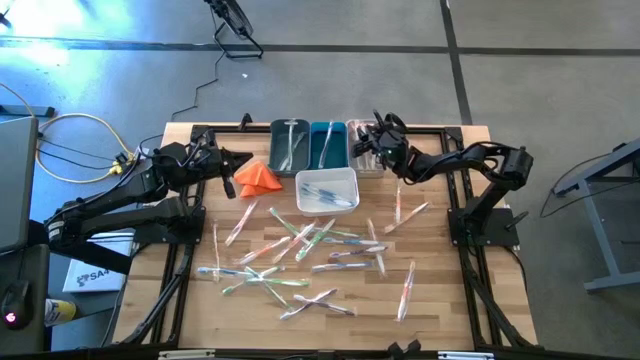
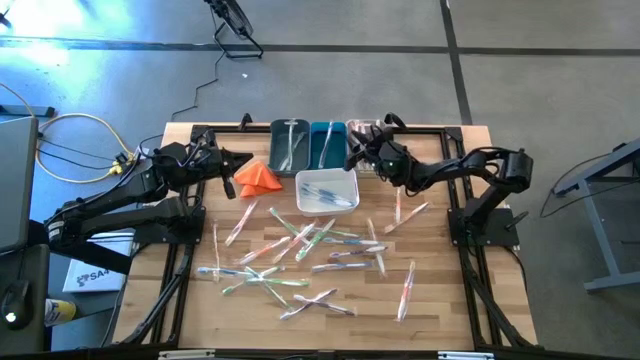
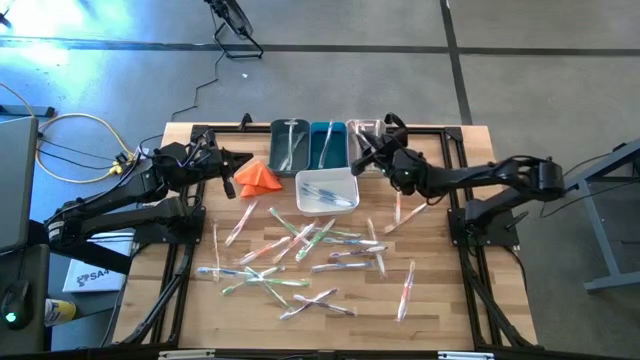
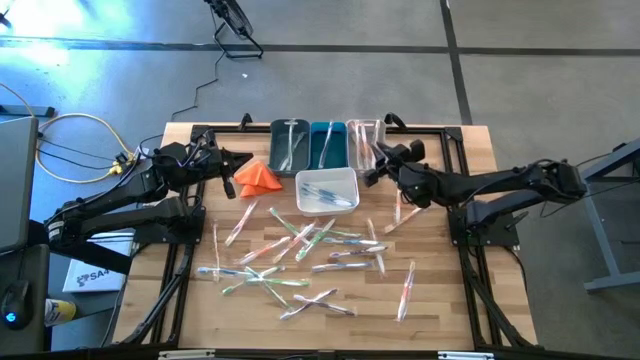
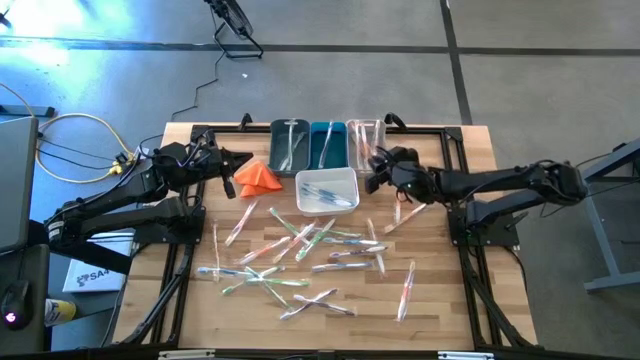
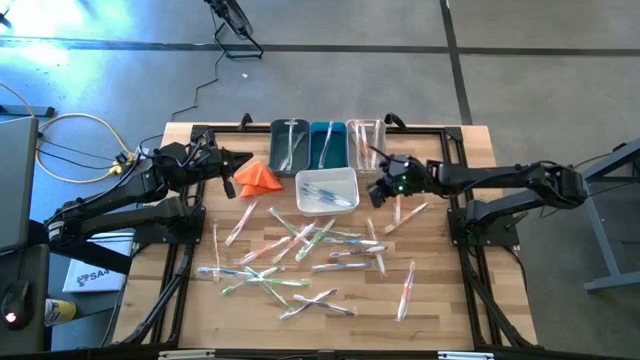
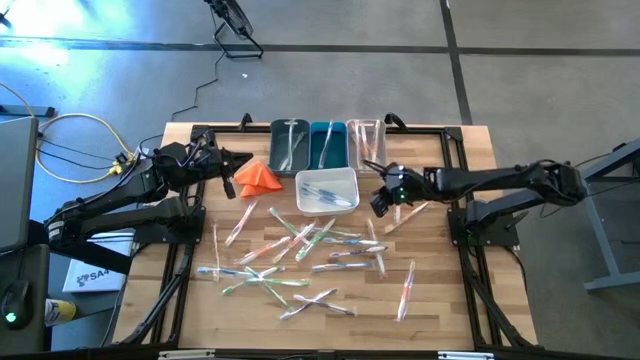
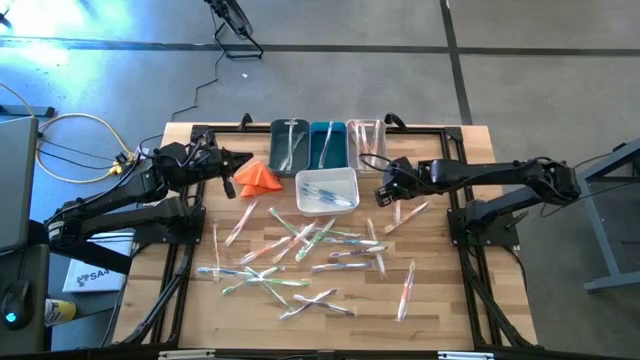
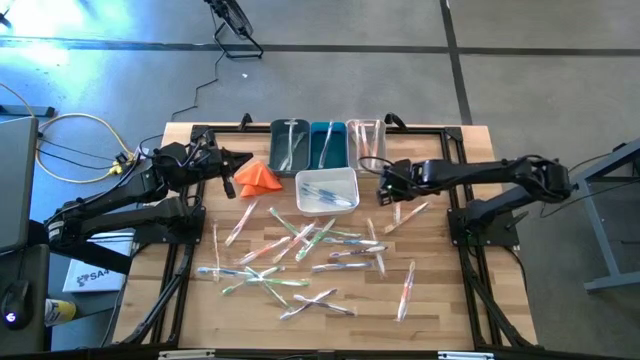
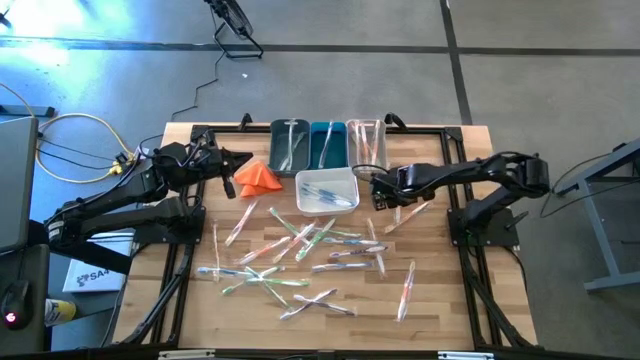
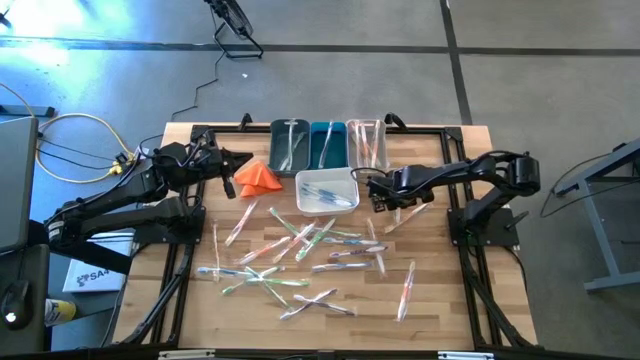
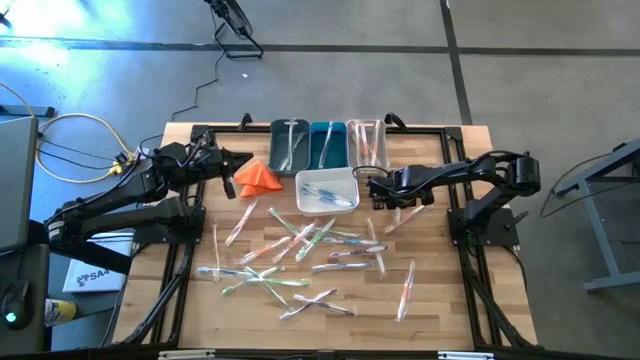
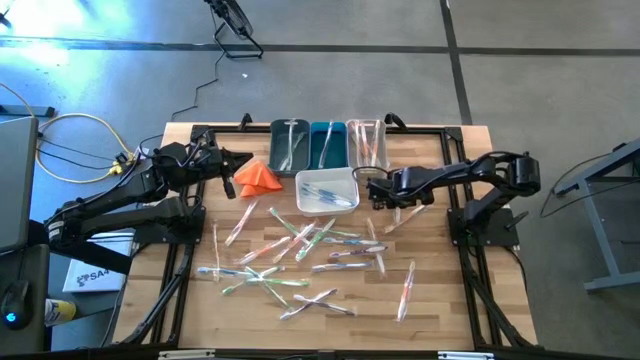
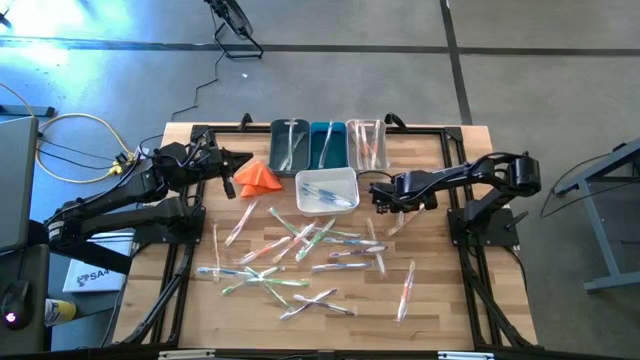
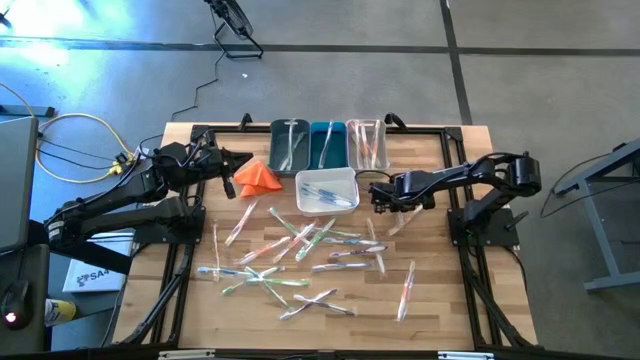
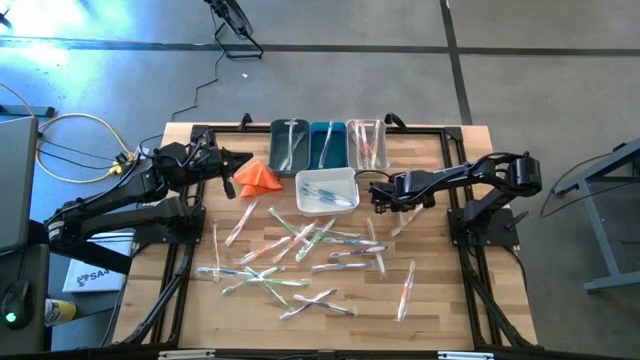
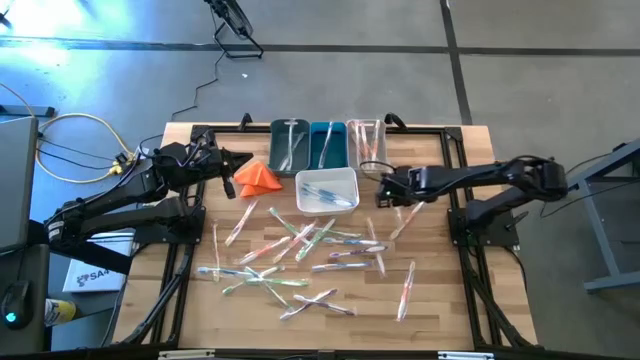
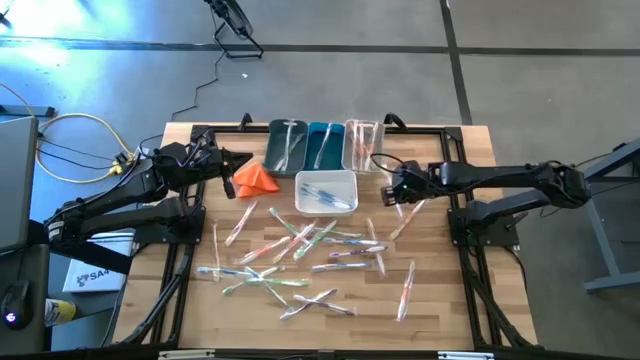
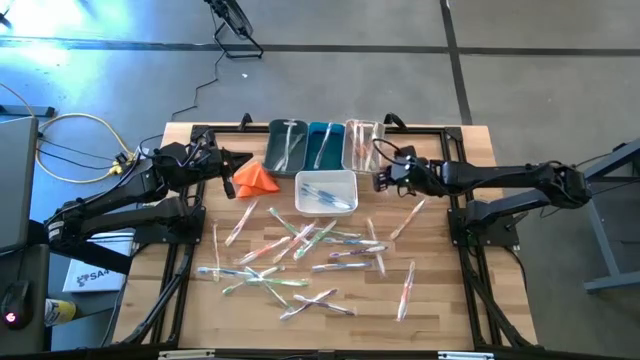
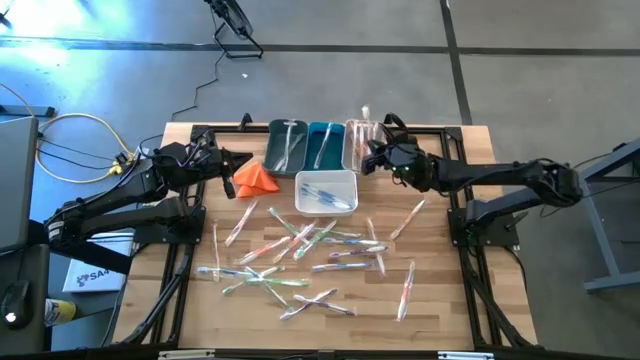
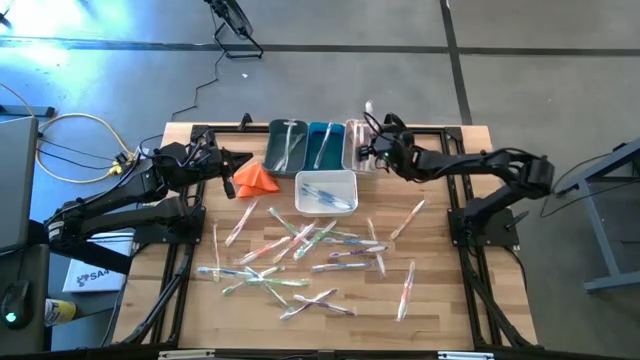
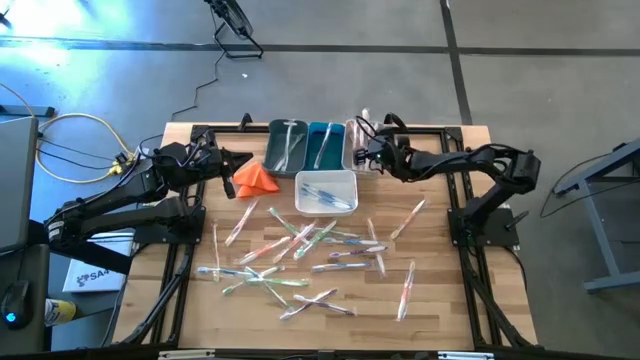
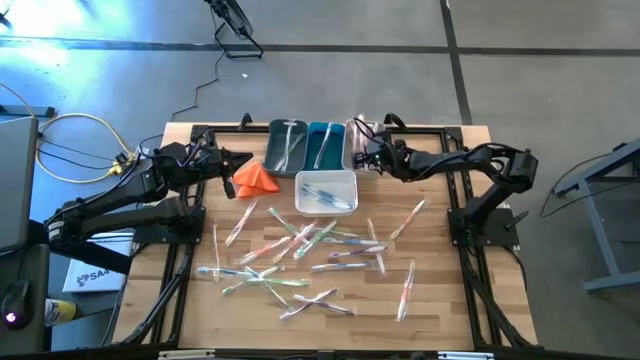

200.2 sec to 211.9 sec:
Task: Pick & Place Toothbrushes
Put the orange toothbrush into the gray bin

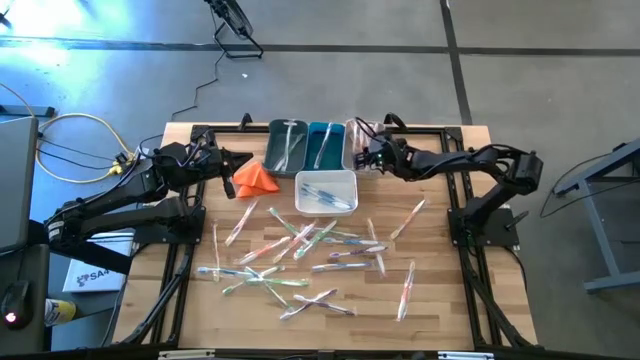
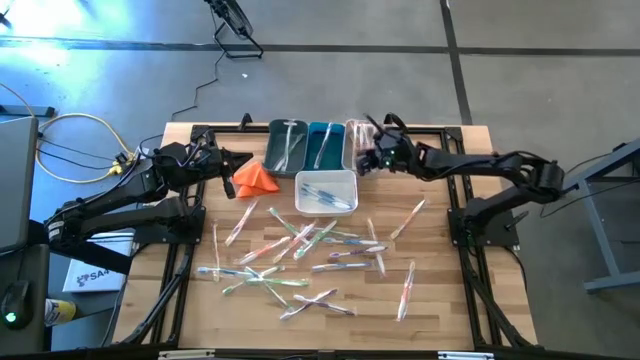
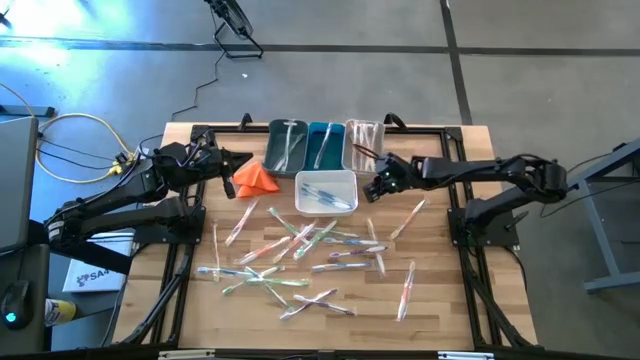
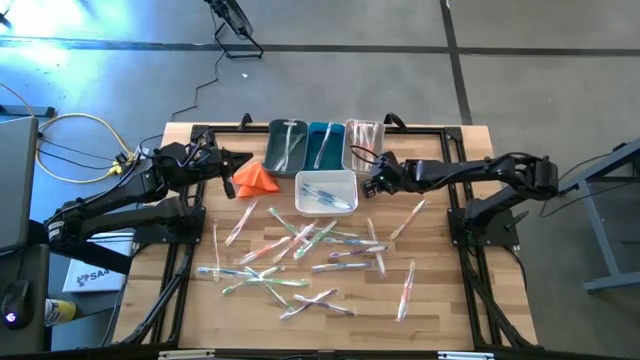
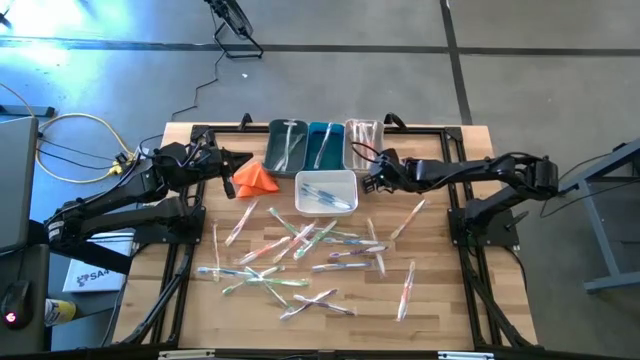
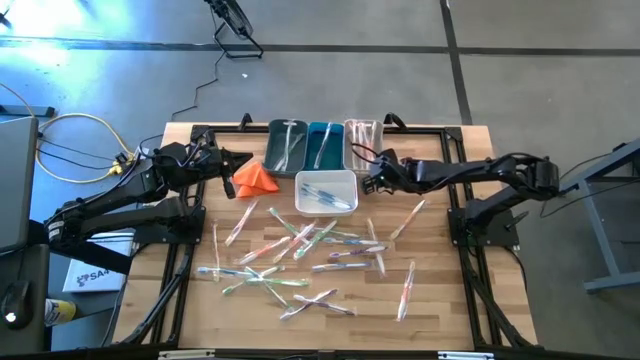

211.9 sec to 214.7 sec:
Adjust the gray bin on the table

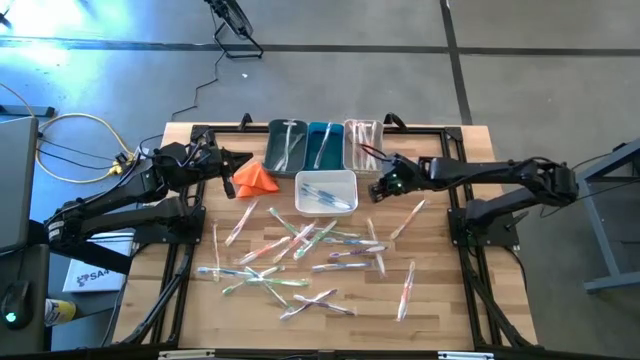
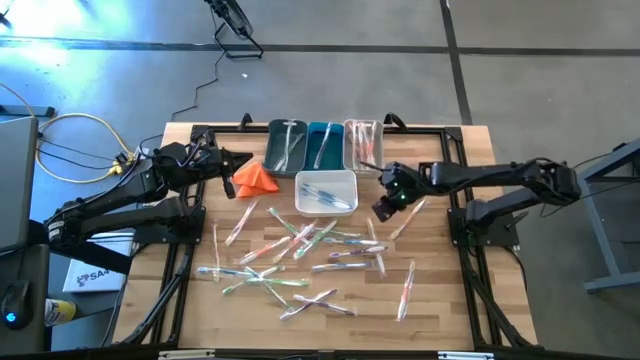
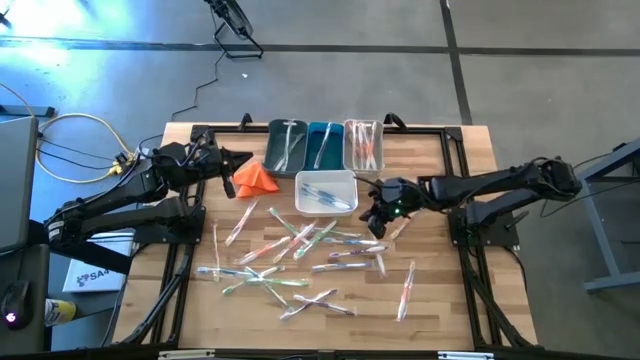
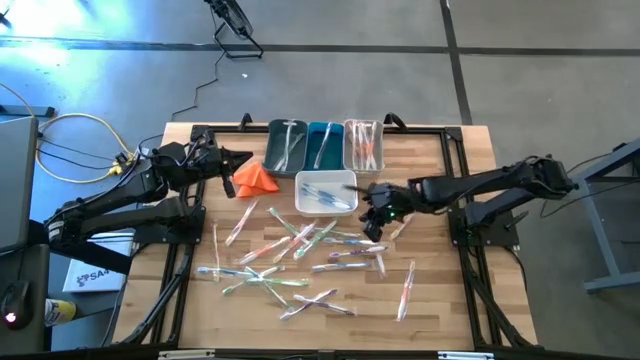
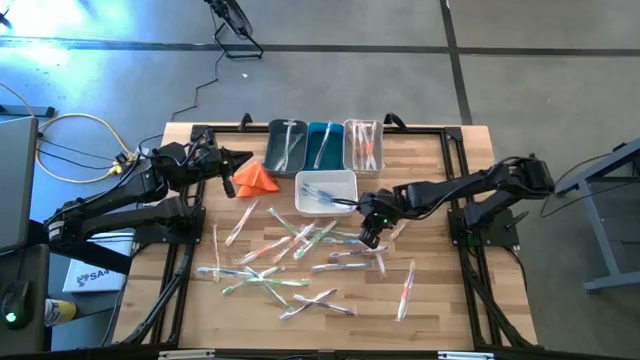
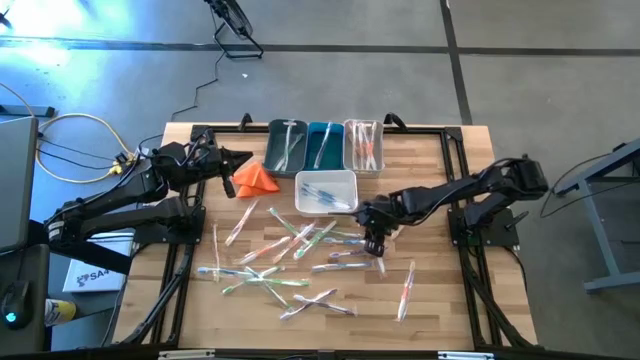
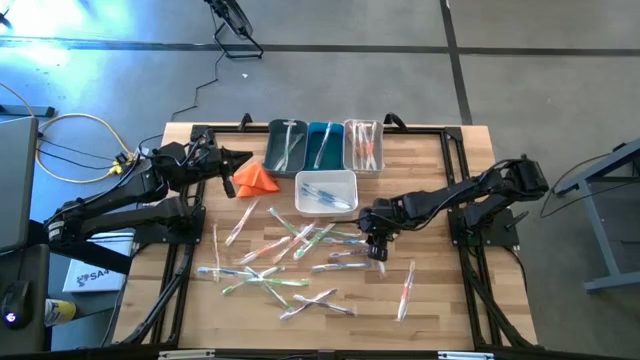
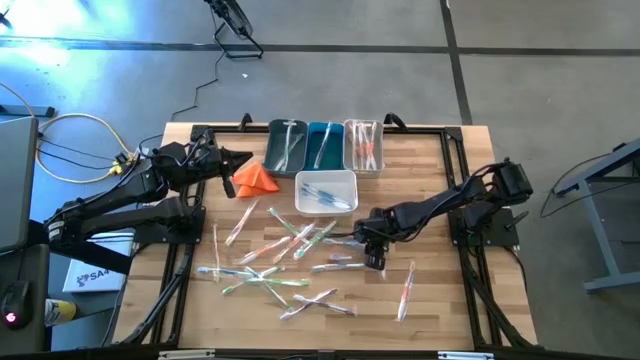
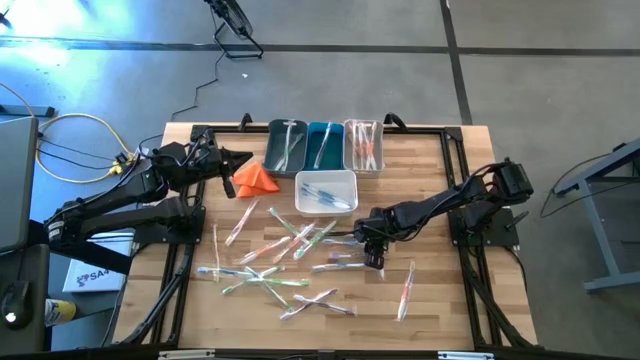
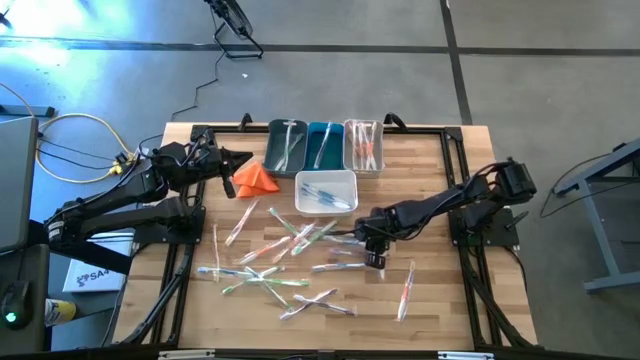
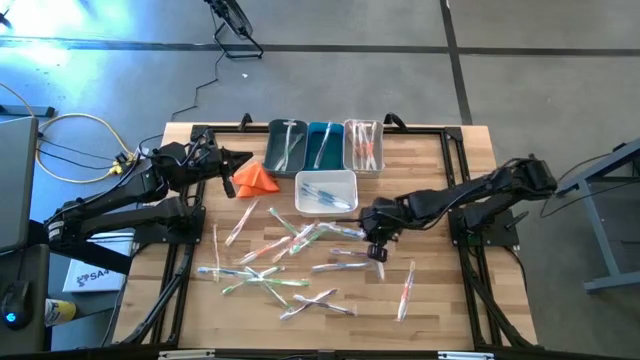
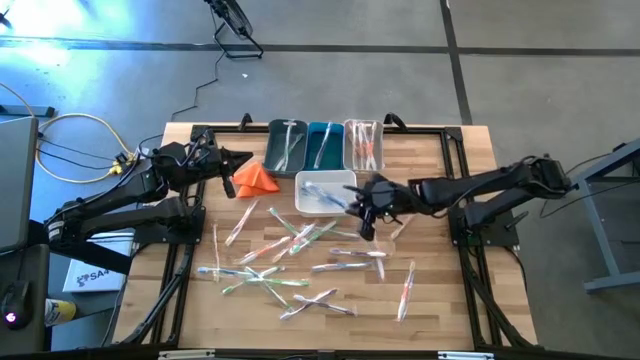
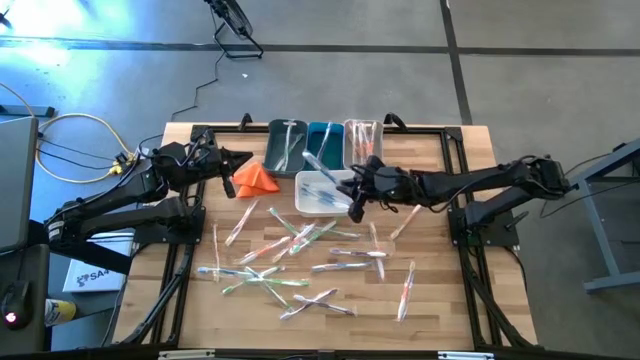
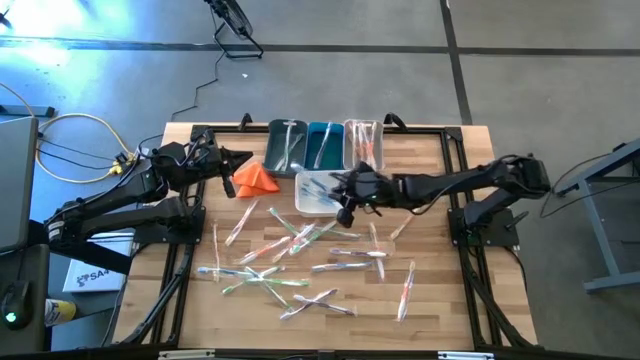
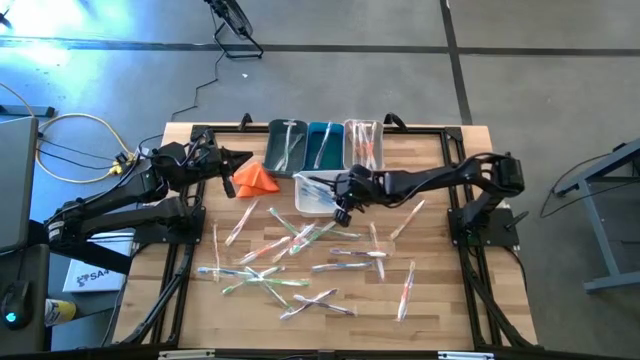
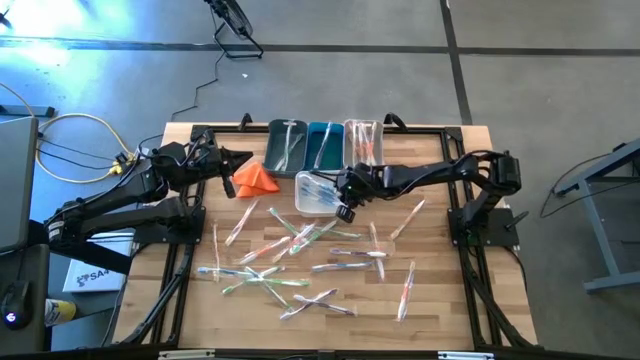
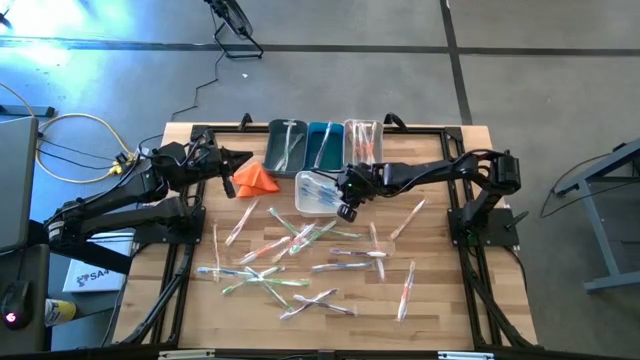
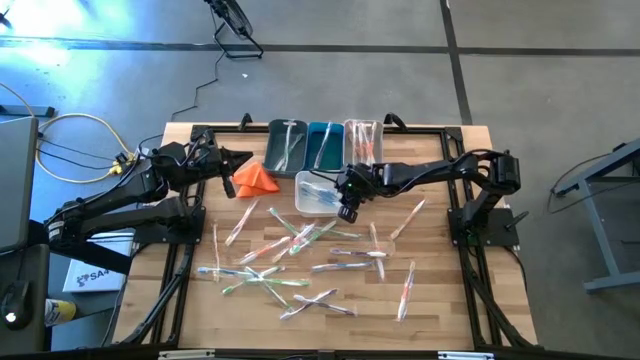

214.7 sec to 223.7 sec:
Put the blue toothbrush into the white bin
